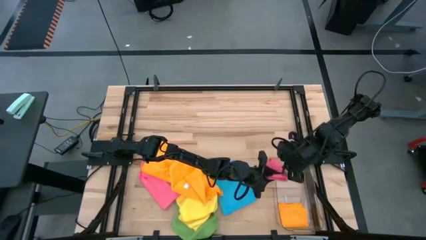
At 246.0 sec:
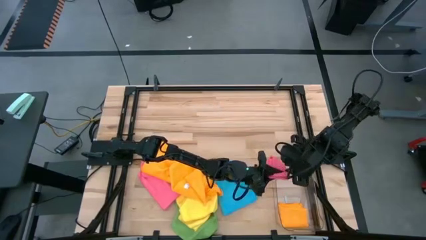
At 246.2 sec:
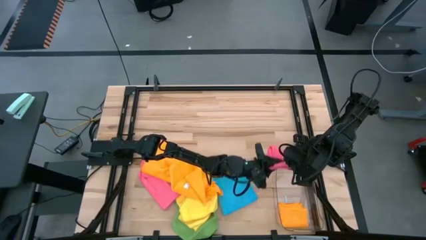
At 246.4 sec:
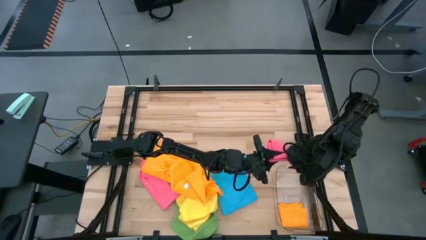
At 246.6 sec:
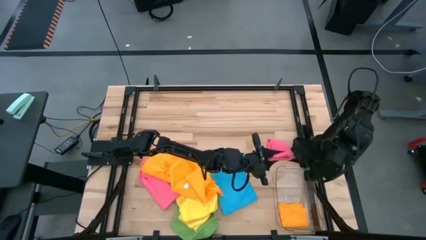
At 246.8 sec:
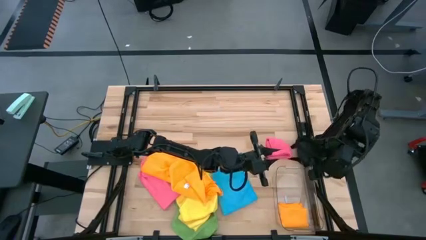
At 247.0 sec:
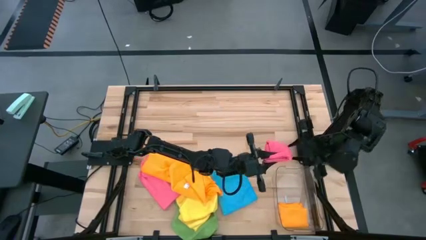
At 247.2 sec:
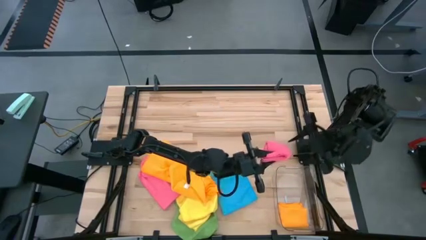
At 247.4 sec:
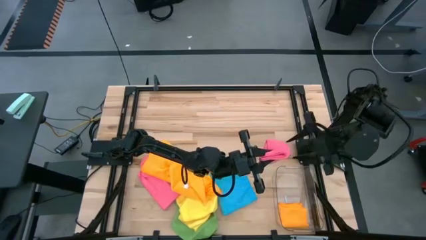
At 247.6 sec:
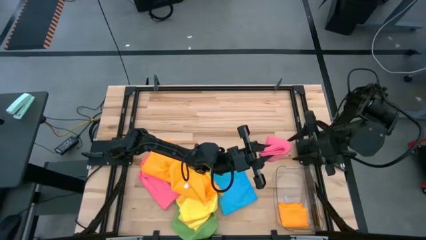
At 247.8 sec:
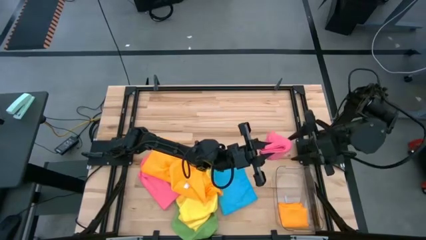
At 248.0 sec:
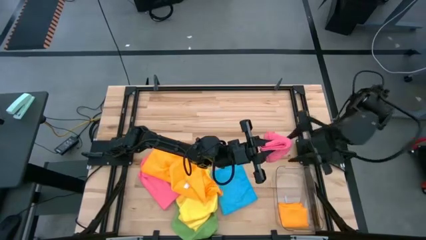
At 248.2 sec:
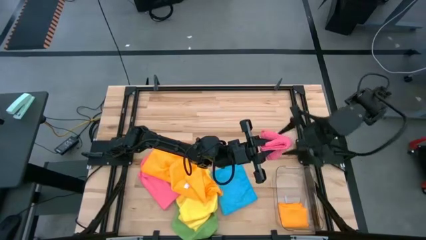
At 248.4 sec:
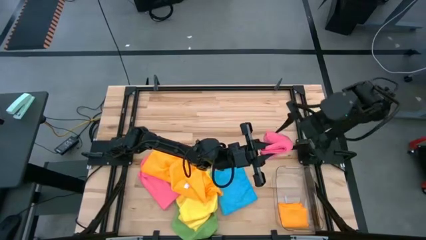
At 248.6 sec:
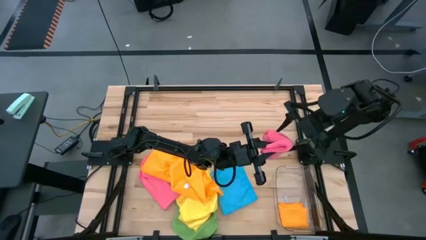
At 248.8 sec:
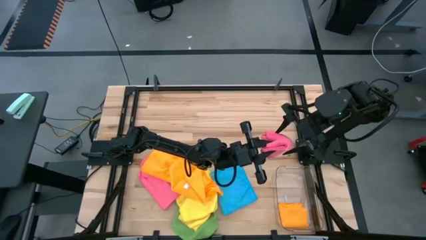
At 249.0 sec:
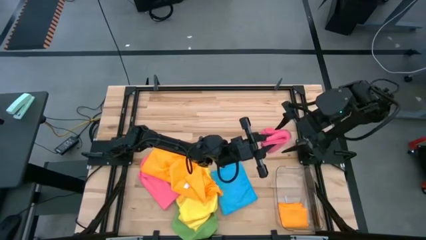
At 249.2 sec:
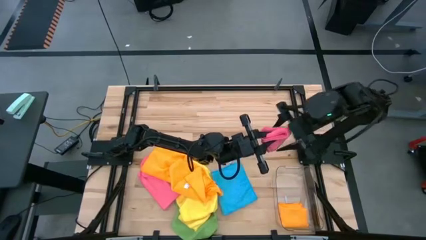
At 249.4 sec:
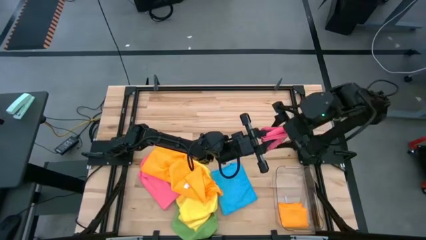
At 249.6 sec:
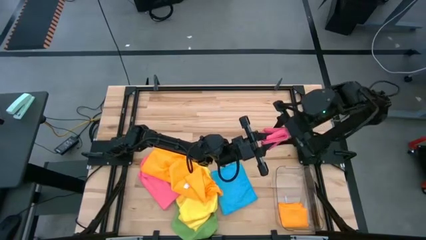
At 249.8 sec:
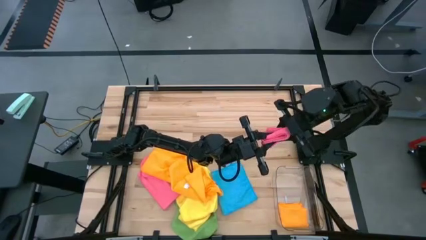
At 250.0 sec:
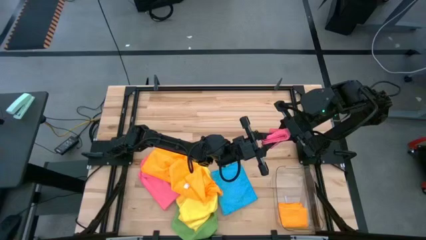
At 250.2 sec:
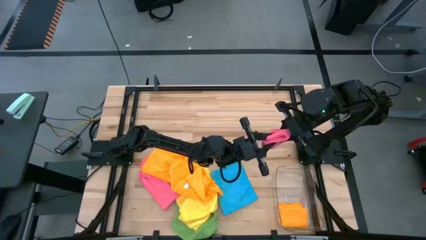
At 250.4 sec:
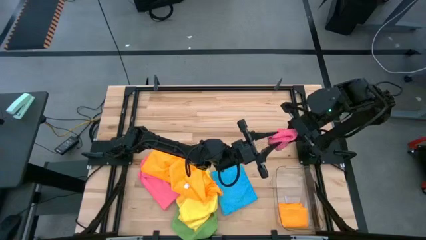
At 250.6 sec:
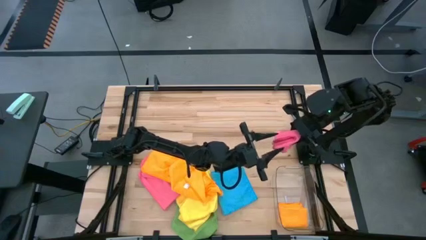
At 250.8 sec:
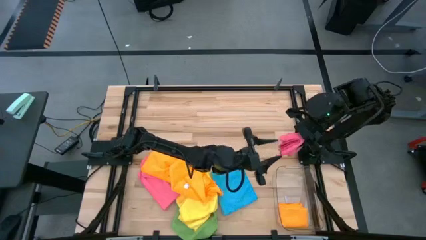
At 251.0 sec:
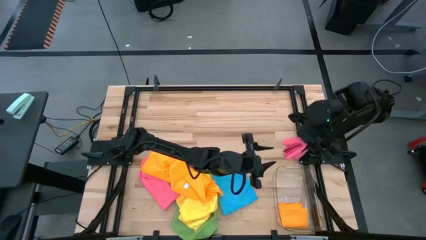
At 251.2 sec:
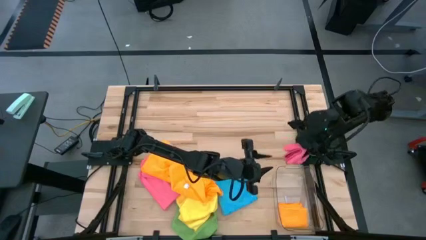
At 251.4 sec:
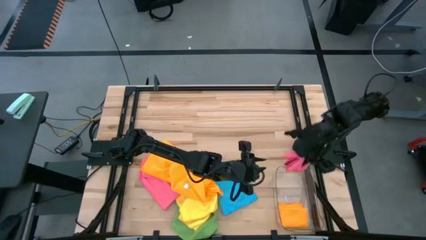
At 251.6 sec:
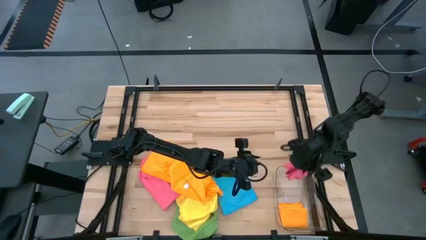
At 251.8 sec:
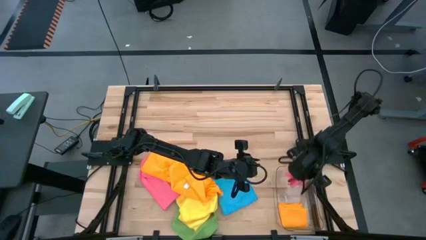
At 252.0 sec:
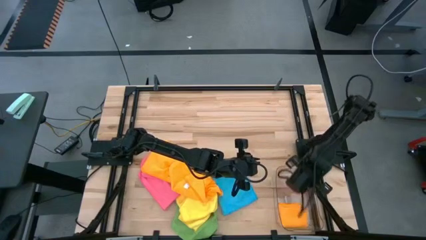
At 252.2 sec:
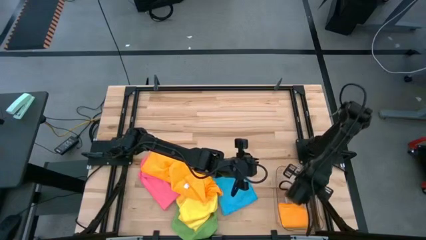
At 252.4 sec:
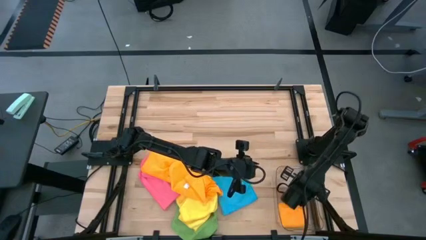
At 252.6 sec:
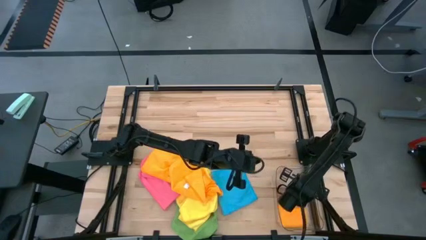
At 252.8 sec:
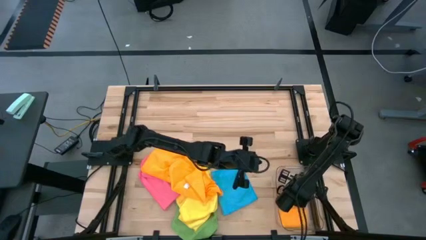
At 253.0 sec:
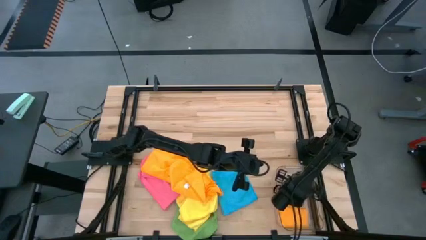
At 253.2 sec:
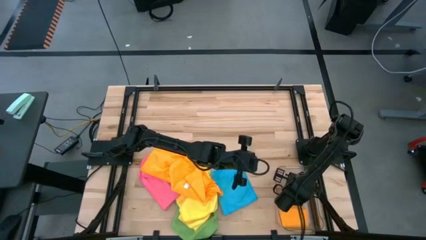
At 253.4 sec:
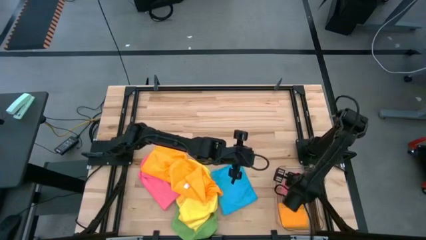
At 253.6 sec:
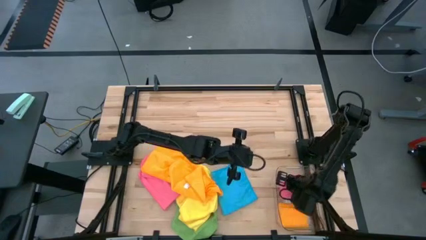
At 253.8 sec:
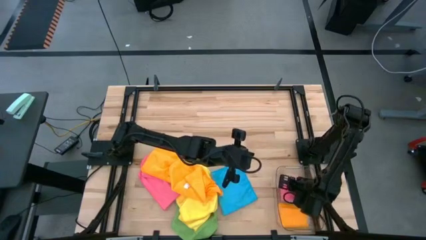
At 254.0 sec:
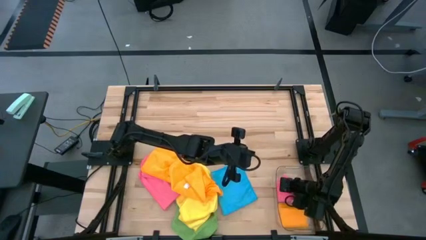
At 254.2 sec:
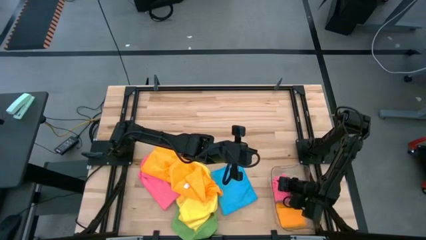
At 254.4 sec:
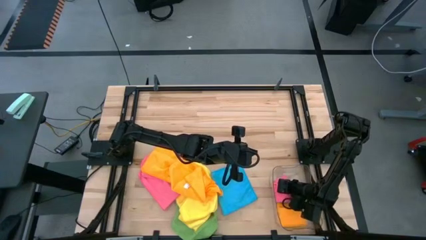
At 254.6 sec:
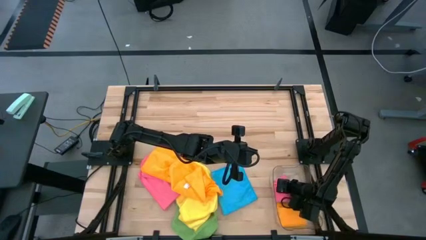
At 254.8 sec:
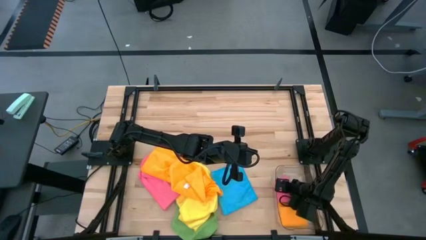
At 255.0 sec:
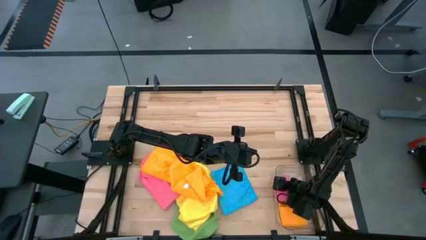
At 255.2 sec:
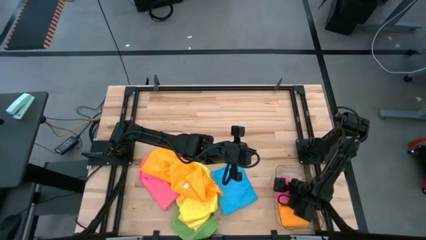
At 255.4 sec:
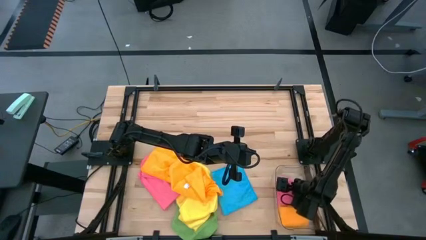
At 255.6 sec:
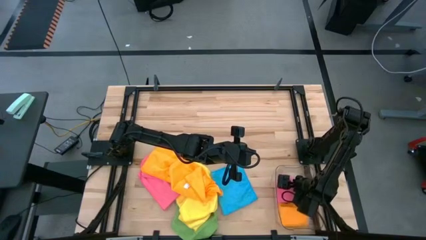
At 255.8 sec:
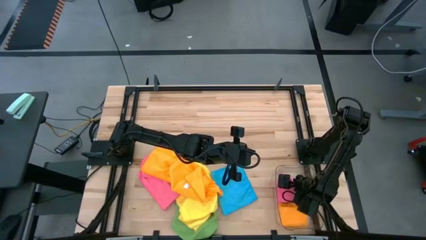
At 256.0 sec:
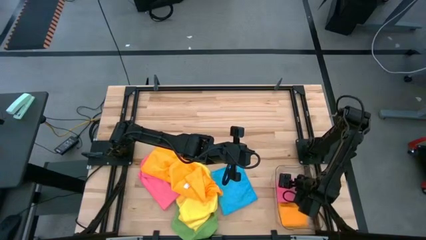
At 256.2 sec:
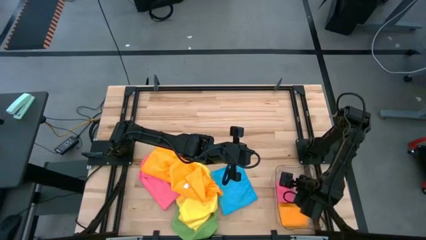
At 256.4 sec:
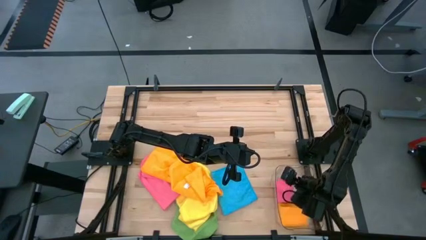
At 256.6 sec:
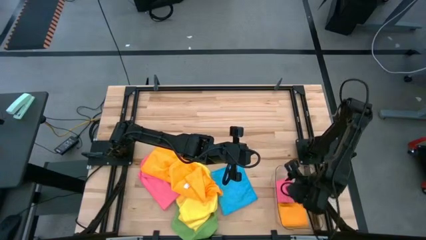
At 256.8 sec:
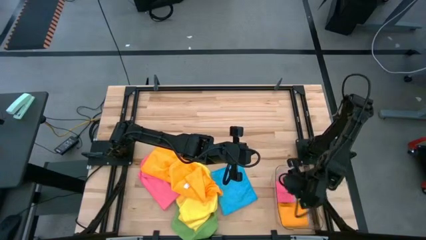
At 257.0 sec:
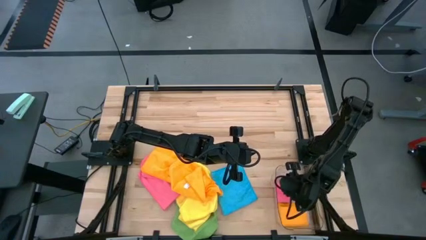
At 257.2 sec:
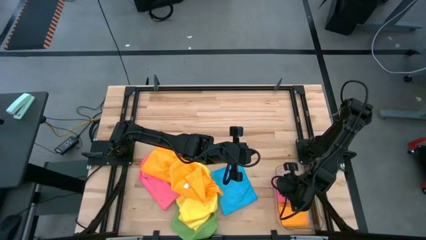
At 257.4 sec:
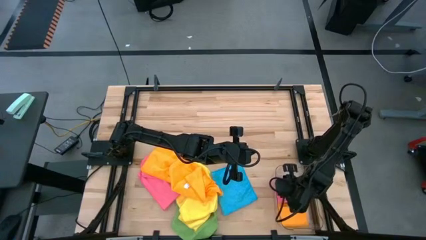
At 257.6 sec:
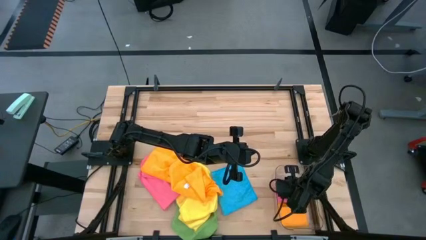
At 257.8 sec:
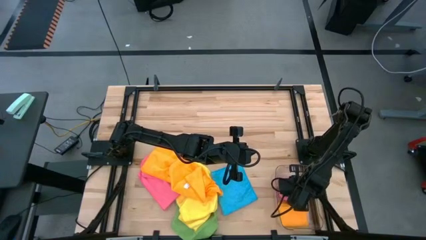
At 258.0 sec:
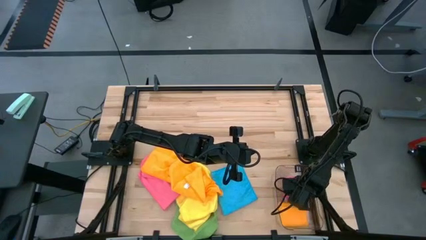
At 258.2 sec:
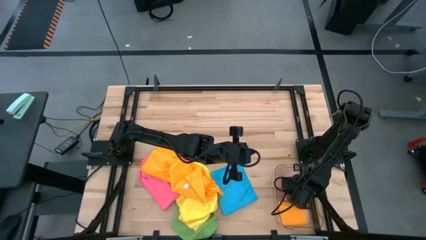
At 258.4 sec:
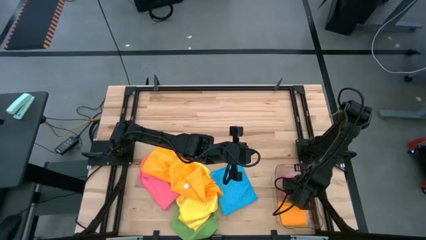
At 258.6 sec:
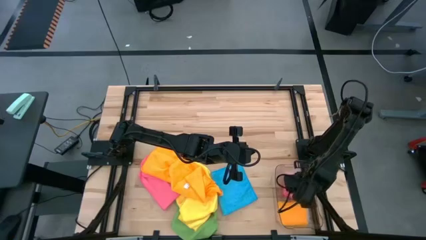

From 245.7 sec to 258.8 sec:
Task: Fold microfiber towels
Put the folded pink towel into the transparent bin

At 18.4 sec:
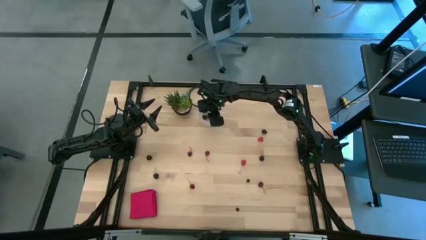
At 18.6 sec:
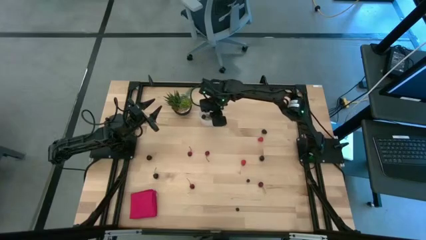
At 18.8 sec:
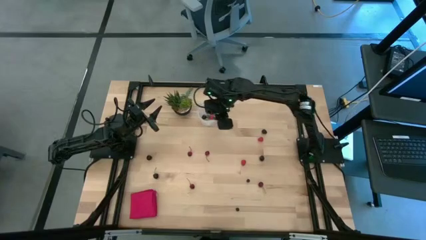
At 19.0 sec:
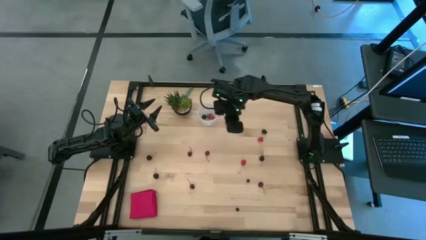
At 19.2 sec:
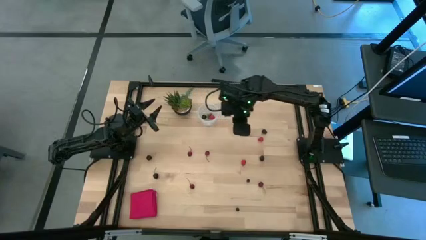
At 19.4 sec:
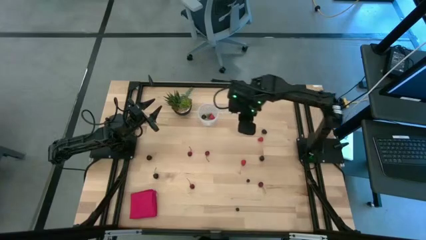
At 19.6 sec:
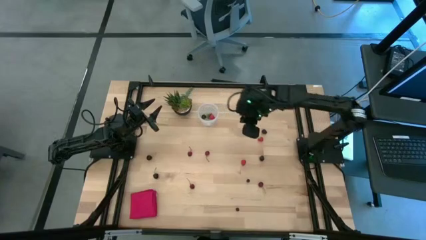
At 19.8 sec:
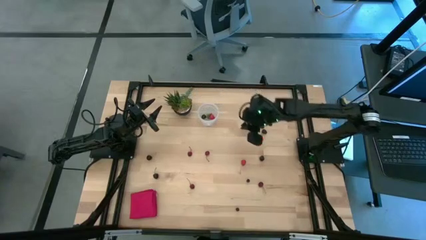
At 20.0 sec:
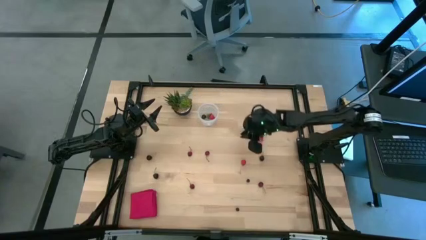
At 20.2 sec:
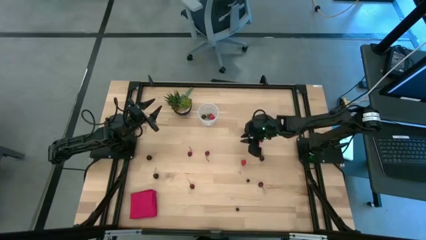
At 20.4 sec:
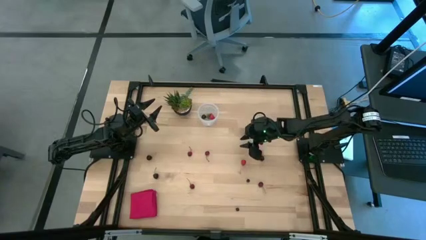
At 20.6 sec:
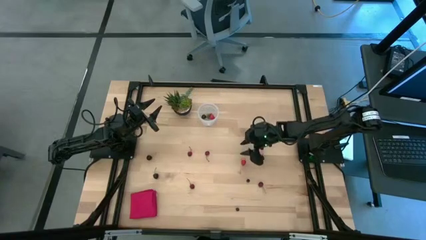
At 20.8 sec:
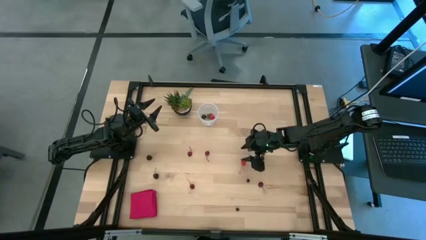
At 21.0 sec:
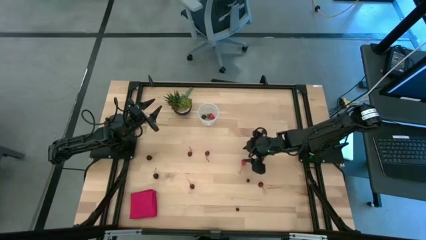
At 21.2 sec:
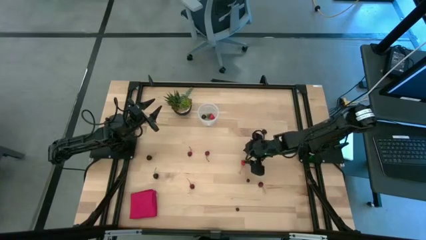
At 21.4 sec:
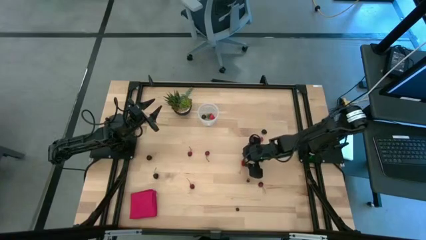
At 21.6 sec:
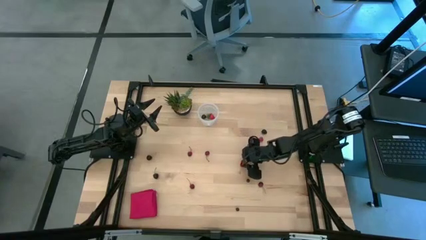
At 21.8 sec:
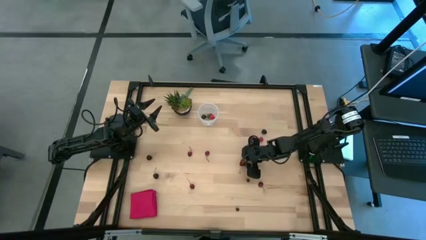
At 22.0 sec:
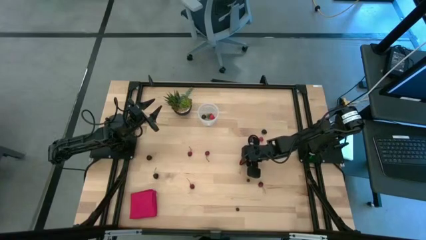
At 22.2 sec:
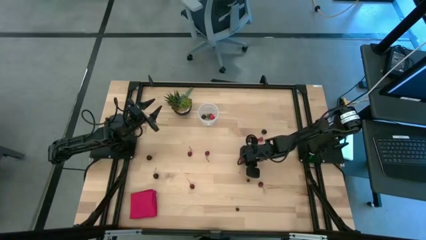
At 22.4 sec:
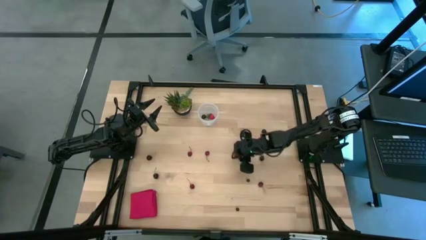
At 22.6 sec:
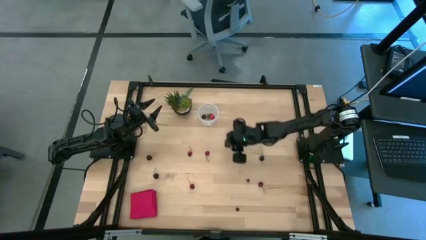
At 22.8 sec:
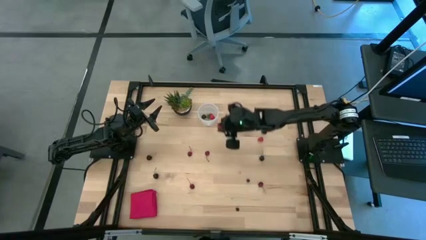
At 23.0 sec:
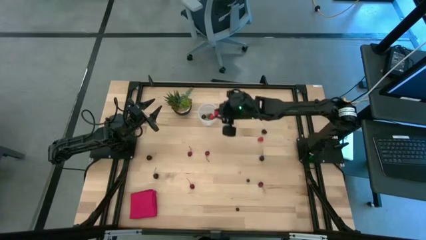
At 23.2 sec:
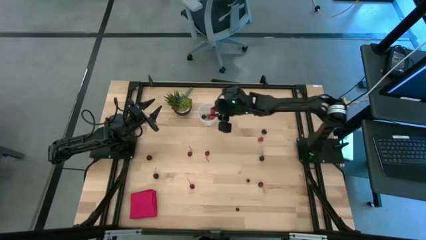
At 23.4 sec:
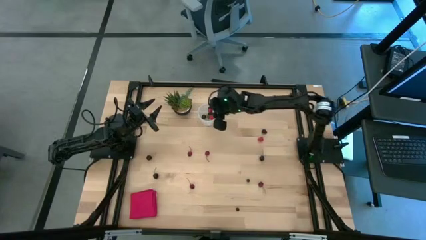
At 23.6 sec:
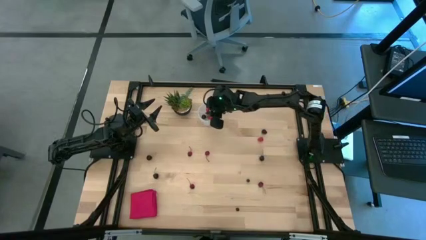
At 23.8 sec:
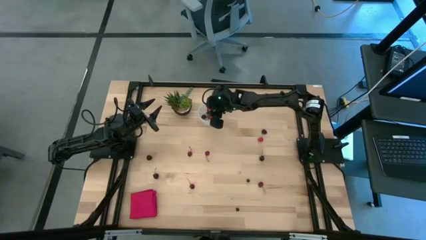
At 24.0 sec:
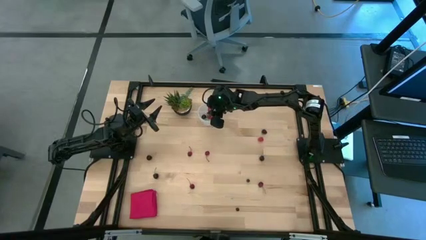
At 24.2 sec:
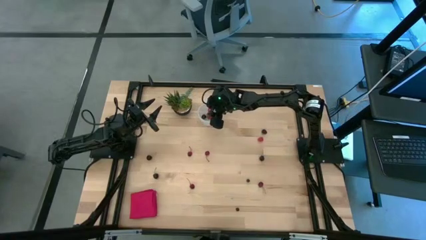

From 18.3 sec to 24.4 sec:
Task: Pick and placing Produce into tupperware
Put the red raspberry into the transparent container
